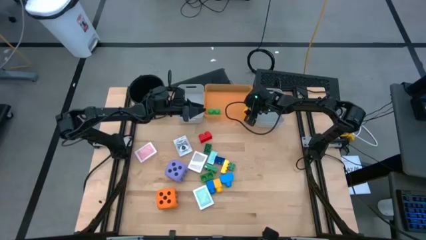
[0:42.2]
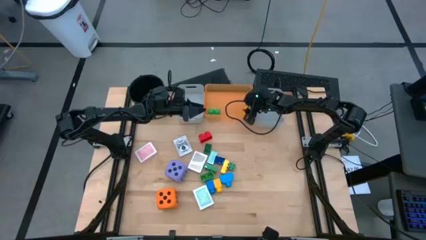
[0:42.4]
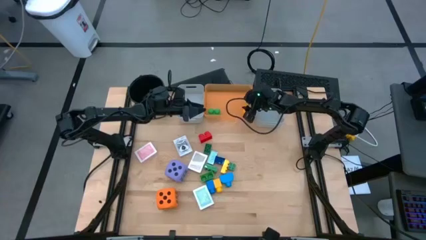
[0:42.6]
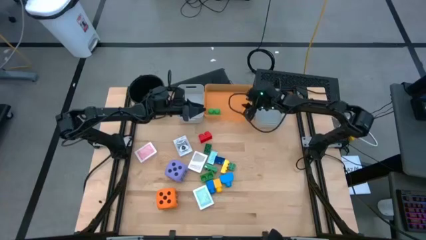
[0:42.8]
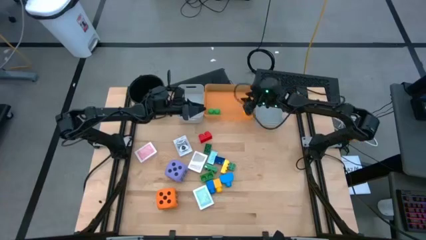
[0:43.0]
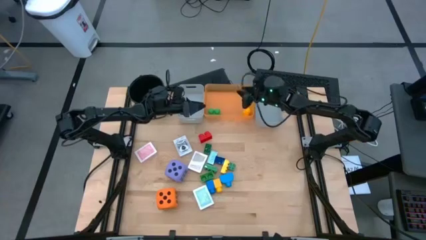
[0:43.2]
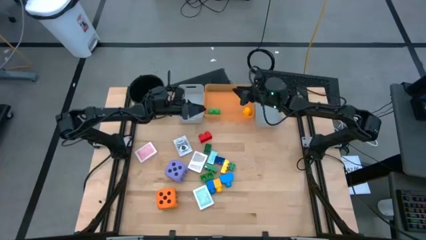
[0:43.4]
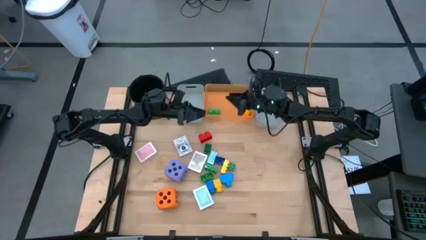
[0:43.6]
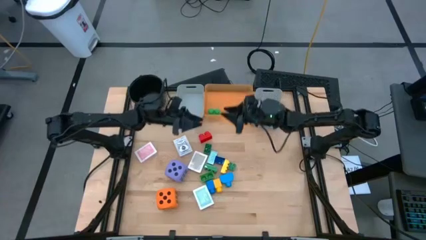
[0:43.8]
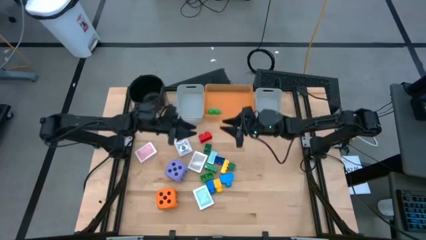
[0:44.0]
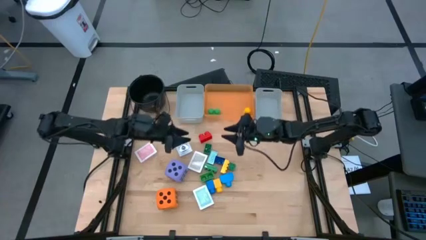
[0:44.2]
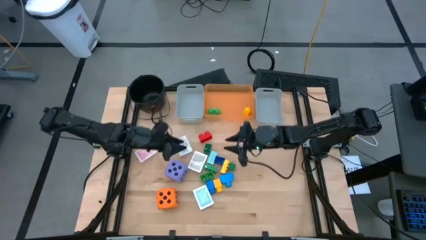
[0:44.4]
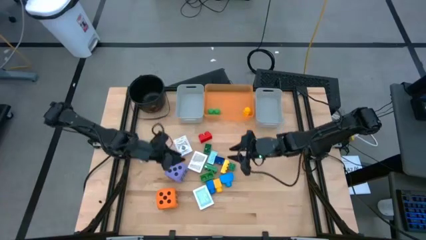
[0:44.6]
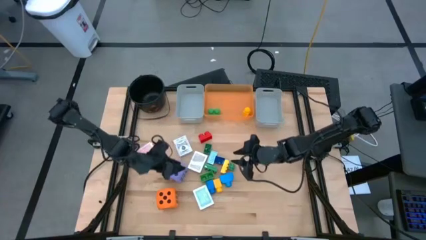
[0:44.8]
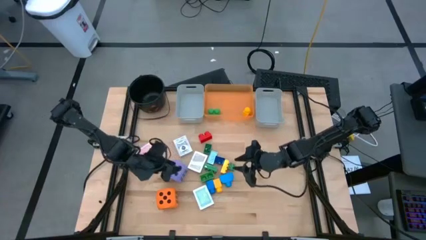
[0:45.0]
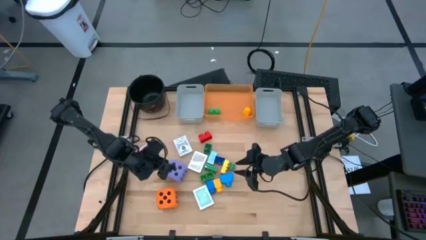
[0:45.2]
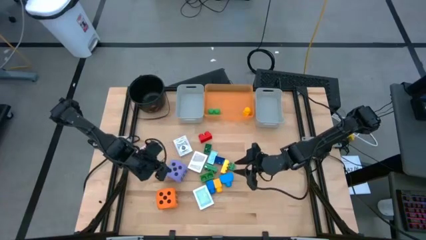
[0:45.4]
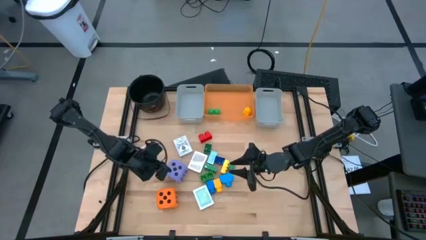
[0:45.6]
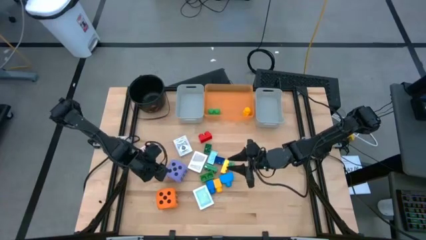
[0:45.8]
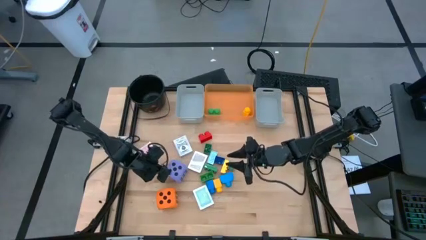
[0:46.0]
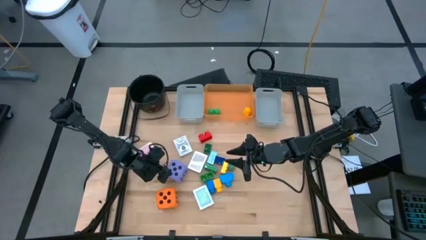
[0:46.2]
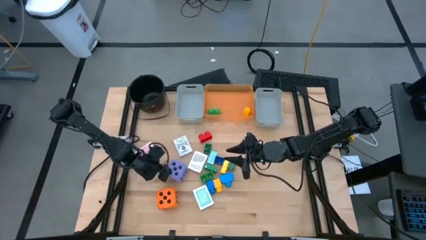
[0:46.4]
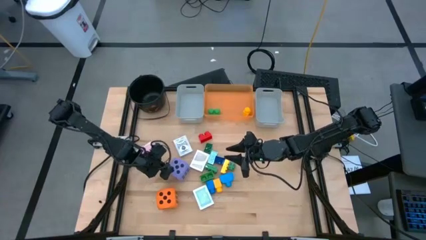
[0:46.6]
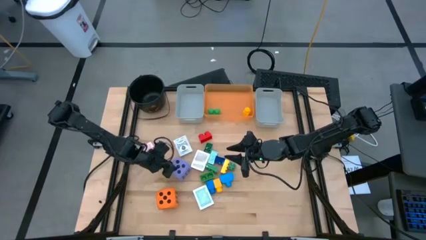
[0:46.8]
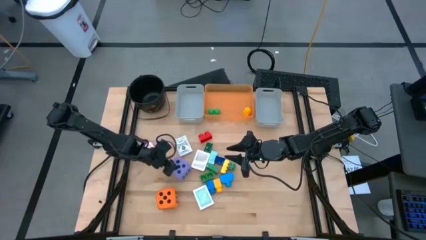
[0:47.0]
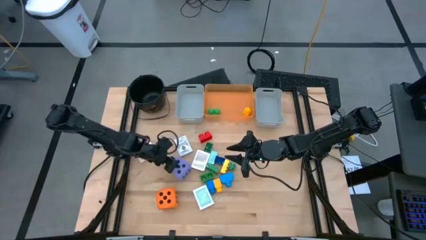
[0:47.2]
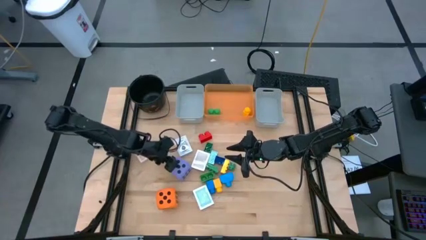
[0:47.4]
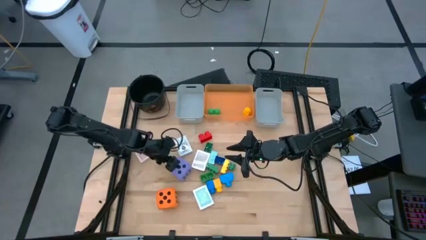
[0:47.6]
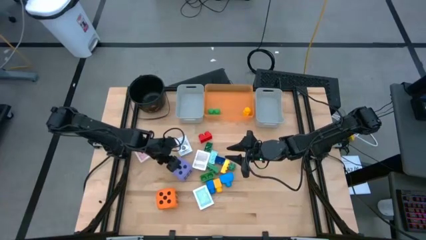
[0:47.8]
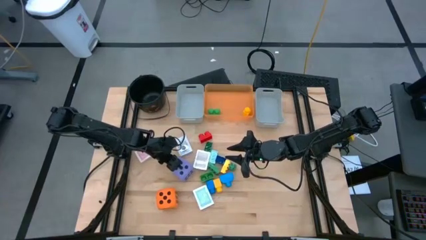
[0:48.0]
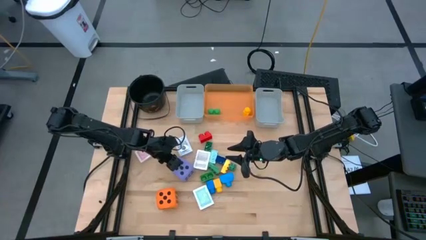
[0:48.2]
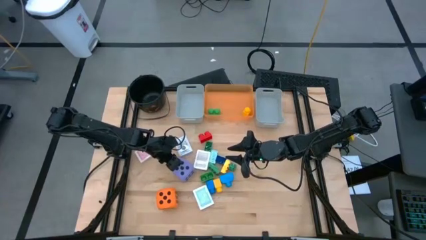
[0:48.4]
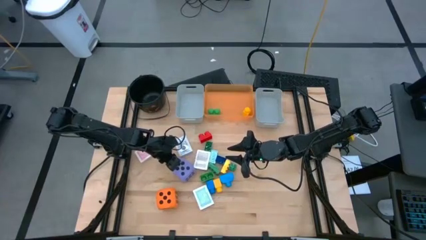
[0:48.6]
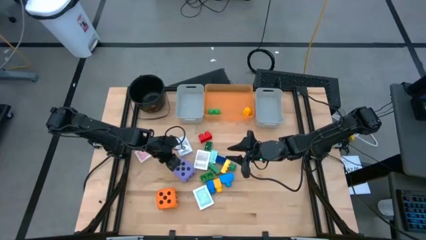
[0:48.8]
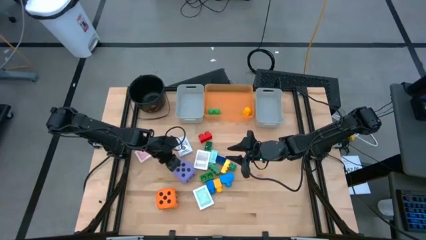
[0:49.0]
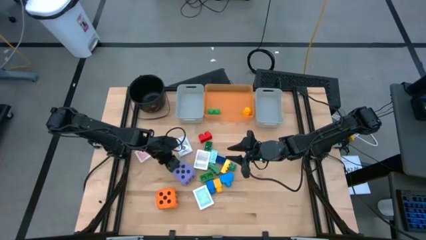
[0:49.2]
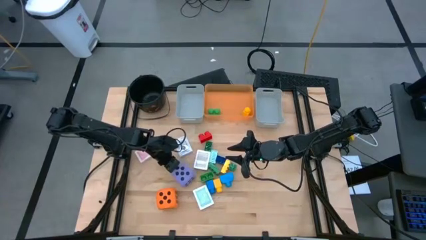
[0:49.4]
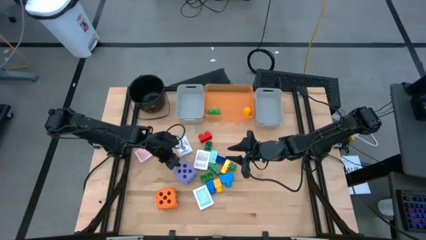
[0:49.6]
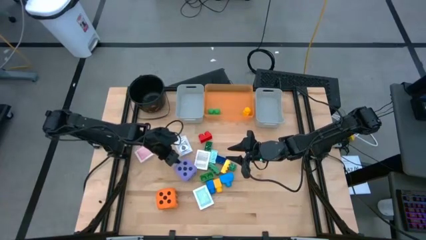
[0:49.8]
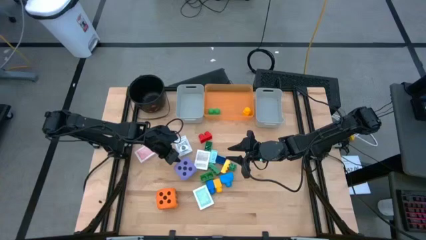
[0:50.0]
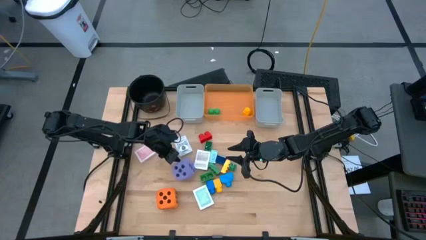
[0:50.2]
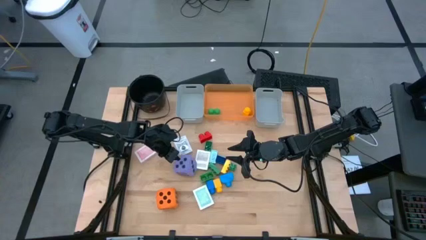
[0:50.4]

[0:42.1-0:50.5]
Task: Pick & Place Toys
Put the purple dice into the left gray bin

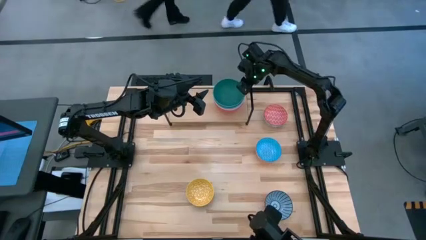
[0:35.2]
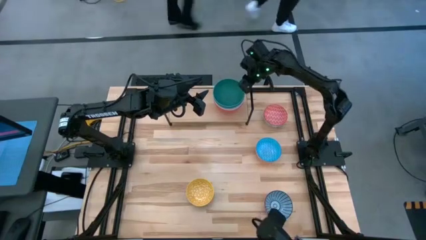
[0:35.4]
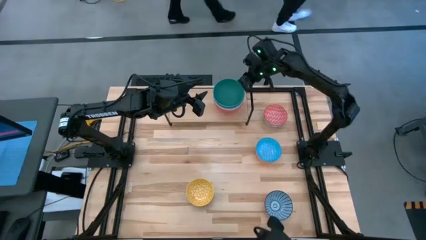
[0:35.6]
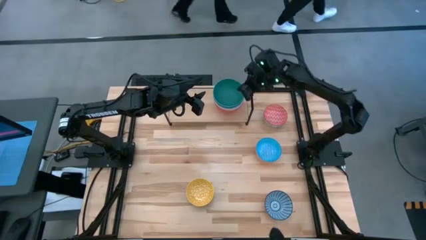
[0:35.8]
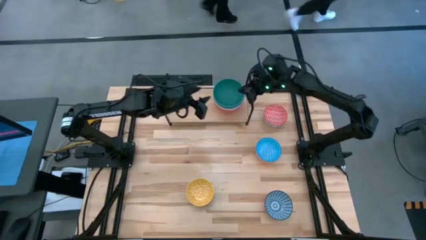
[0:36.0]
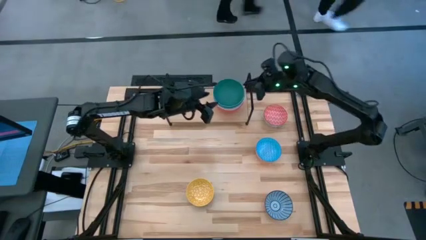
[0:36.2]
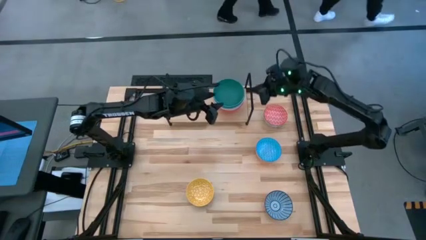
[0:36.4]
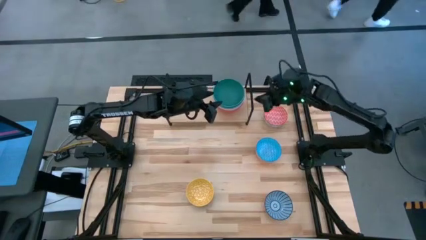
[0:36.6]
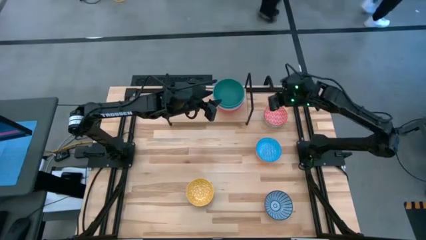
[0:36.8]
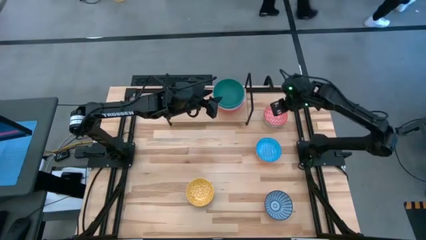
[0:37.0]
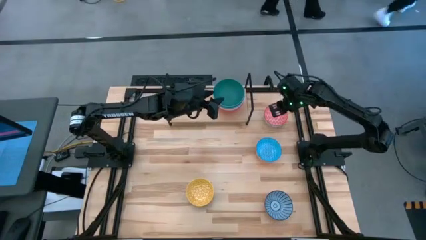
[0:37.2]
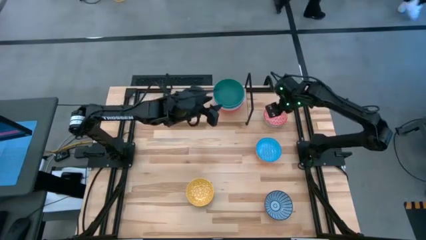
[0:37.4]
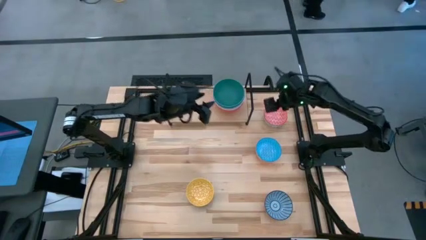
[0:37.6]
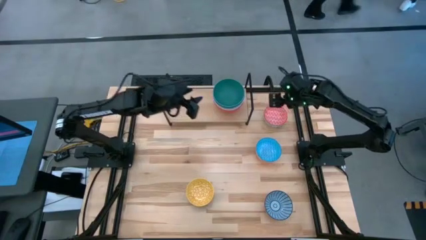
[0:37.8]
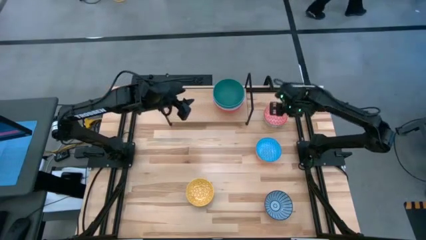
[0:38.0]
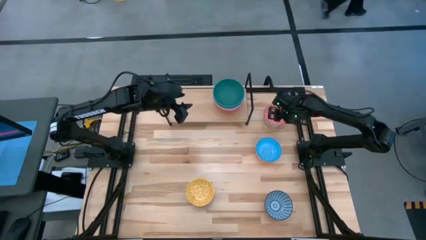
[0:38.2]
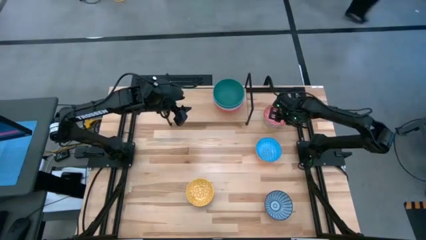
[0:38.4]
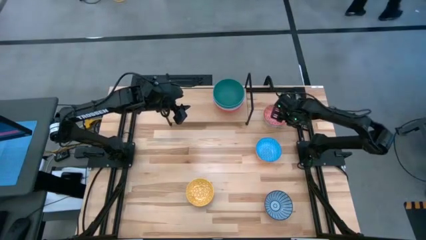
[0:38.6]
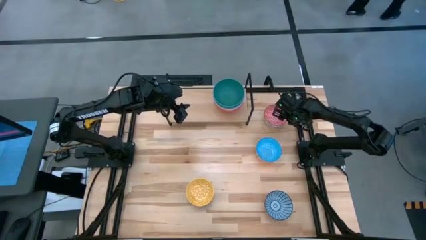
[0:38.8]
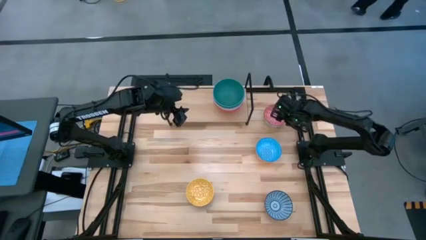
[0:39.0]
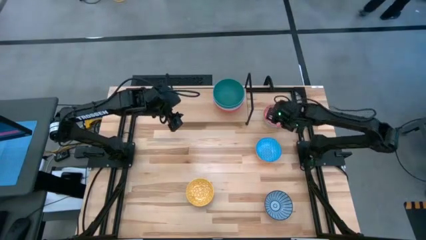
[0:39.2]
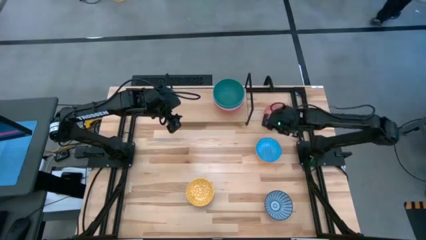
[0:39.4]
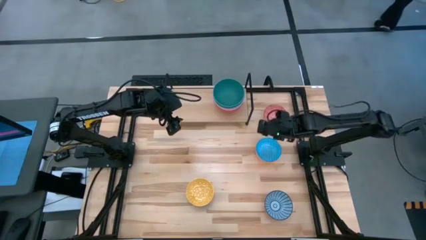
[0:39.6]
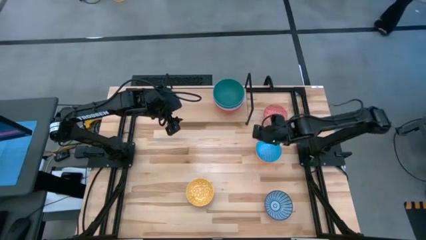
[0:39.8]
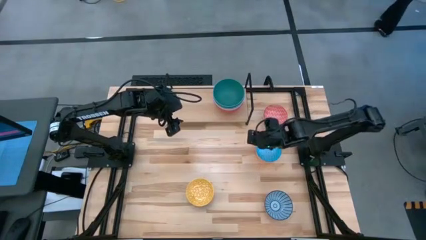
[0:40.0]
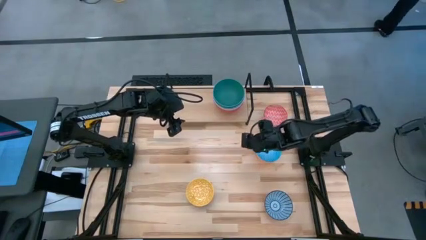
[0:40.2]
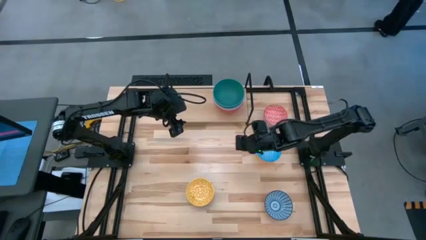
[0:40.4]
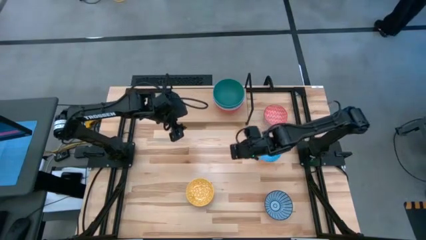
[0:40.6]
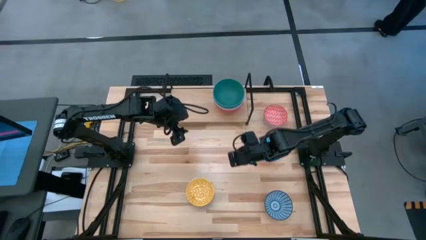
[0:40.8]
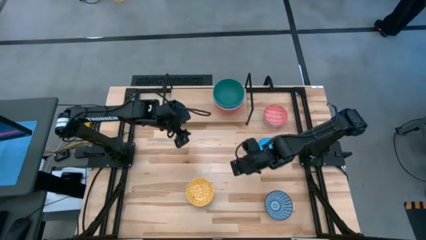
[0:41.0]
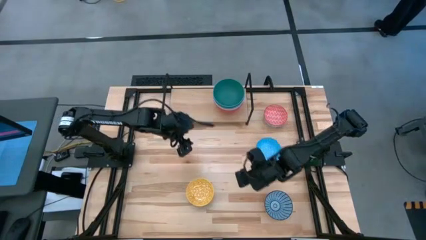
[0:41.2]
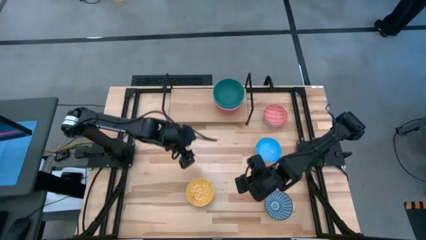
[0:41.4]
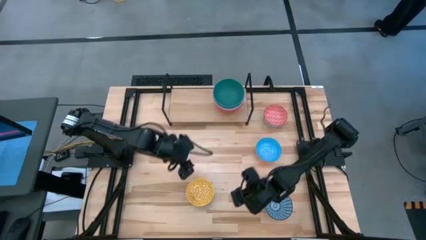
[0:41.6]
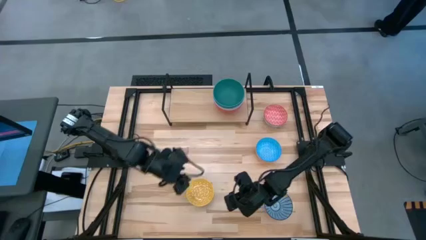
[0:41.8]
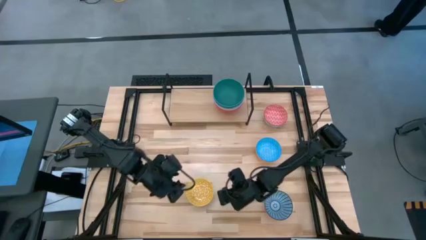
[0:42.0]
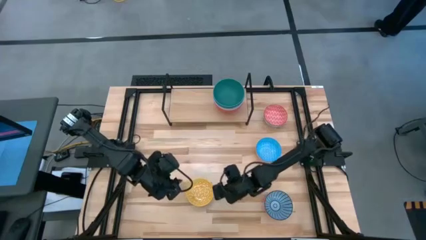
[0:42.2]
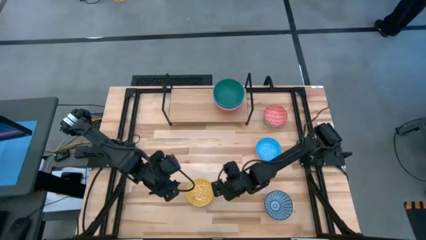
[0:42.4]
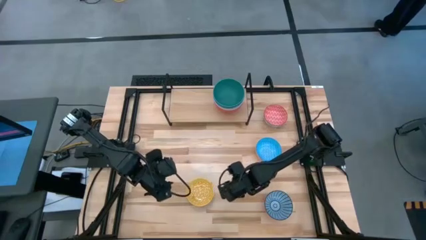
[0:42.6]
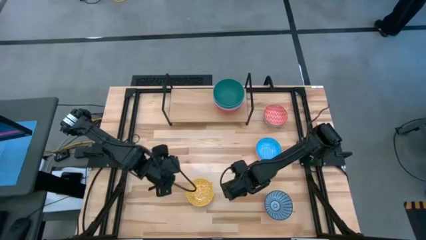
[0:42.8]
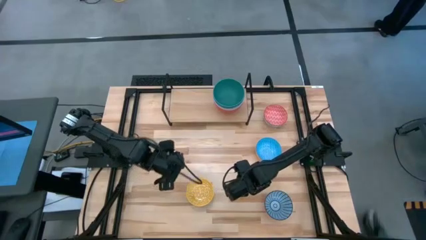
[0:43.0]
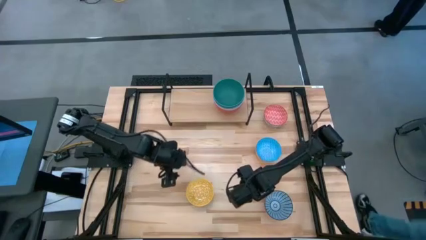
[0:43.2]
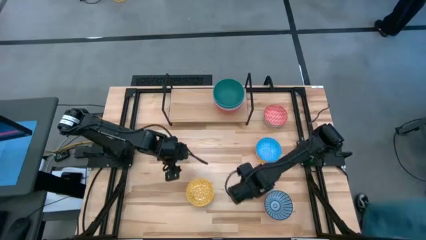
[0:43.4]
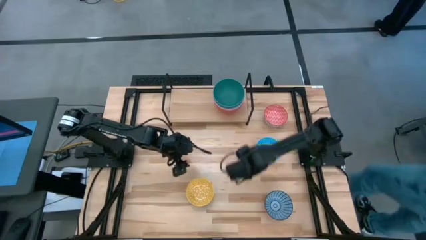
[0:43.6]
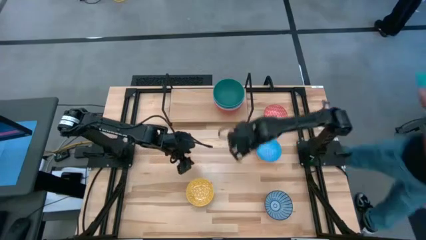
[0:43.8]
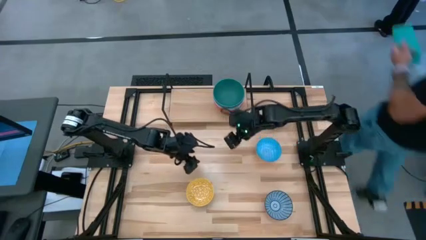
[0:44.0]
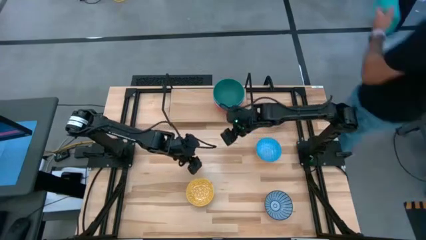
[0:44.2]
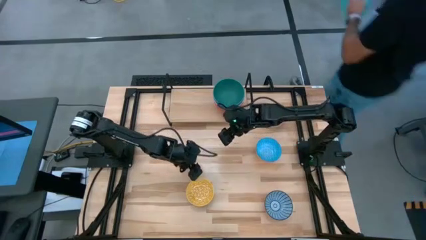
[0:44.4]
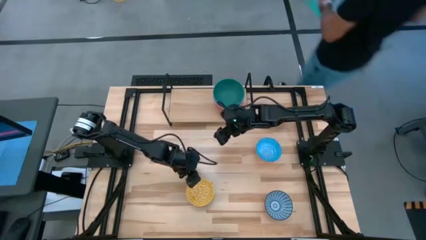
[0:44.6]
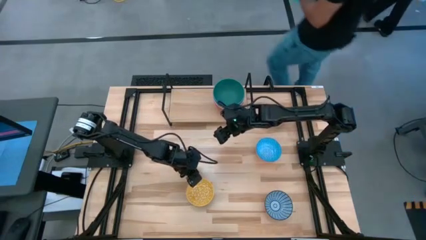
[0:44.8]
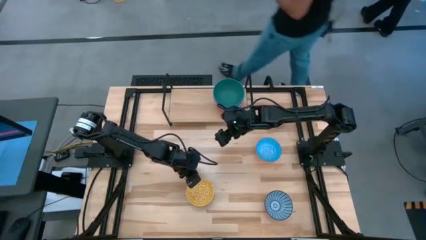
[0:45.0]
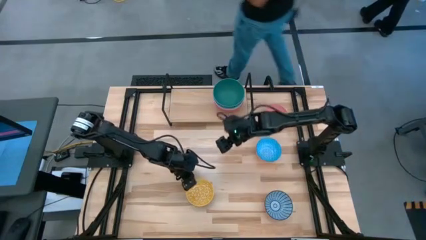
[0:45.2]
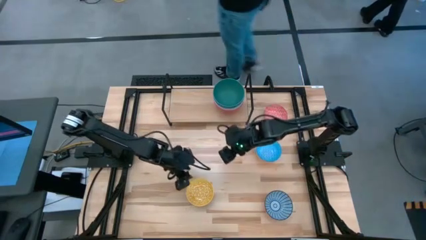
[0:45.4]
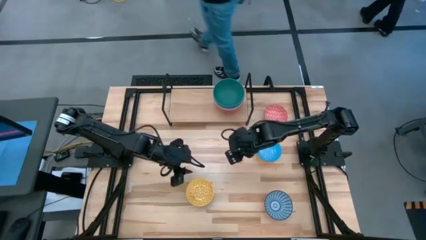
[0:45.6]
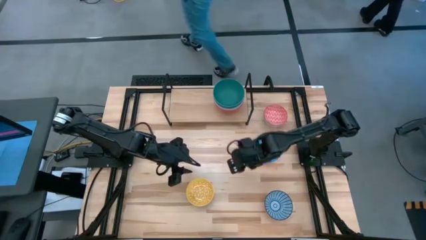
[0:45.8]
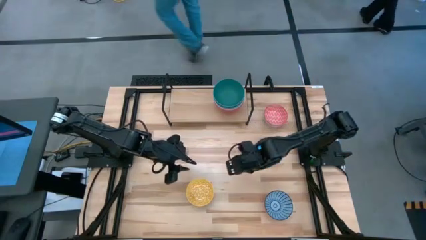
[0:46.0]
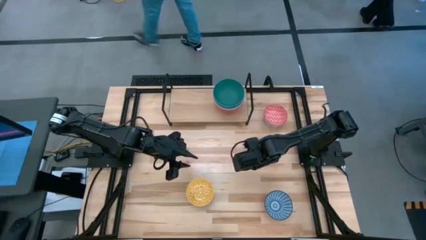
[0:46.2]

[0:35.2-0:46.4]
Task: Place and stack bowls onto a shelf
Put the red patterned bowl on the shelf
